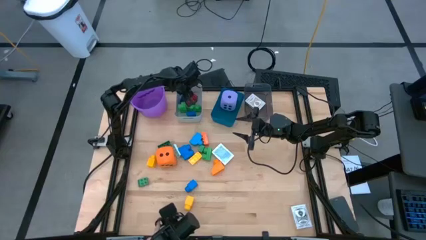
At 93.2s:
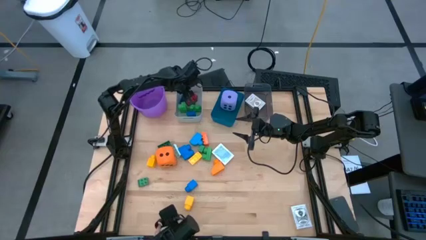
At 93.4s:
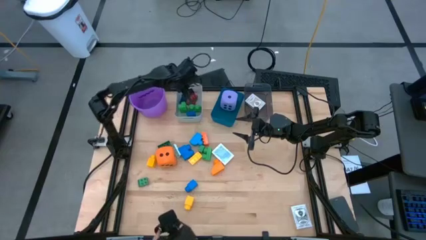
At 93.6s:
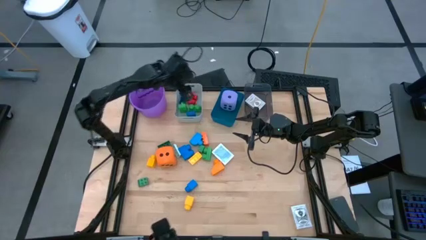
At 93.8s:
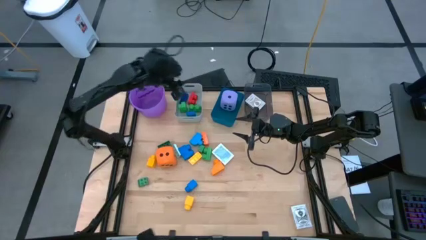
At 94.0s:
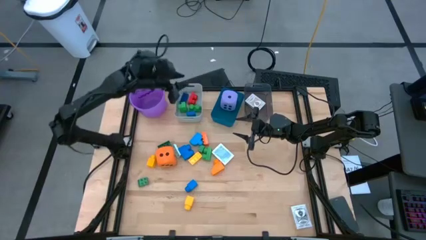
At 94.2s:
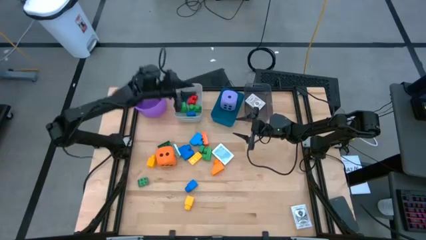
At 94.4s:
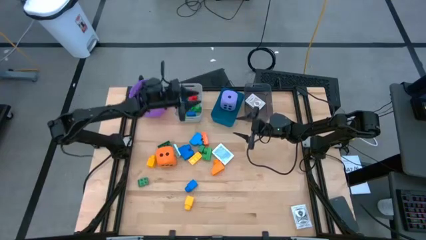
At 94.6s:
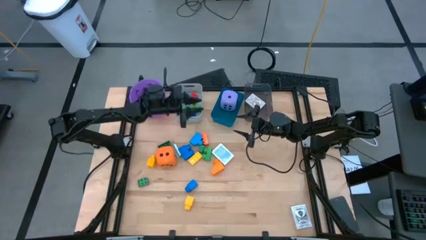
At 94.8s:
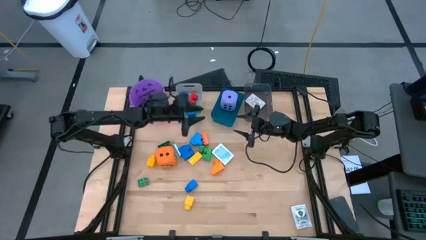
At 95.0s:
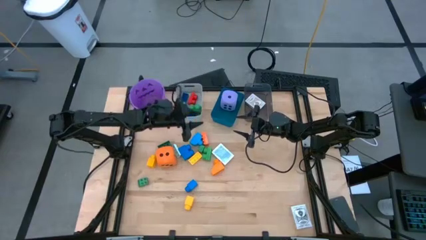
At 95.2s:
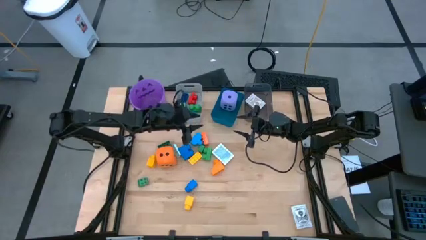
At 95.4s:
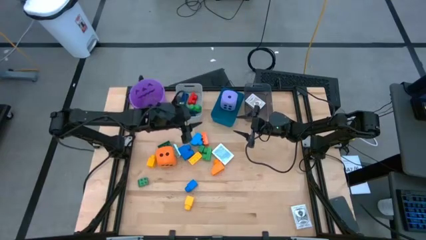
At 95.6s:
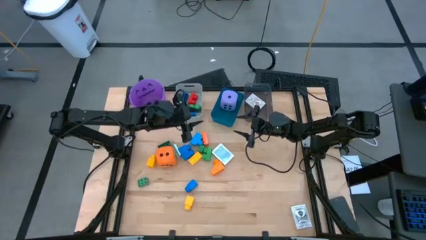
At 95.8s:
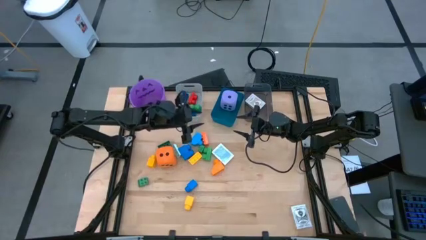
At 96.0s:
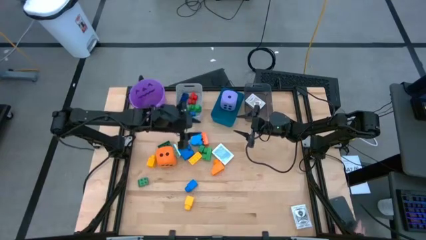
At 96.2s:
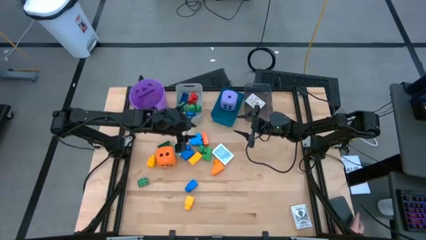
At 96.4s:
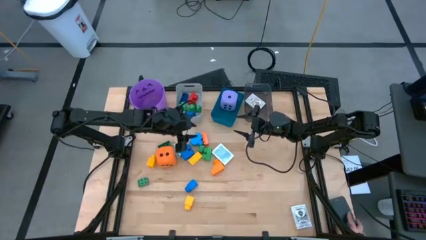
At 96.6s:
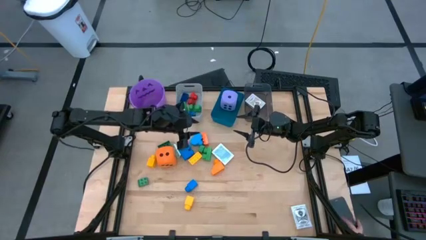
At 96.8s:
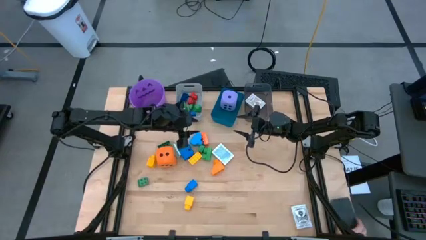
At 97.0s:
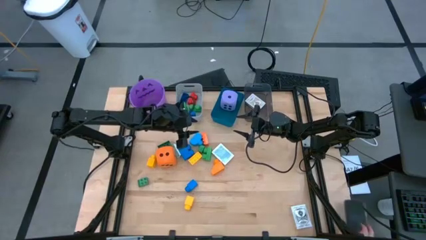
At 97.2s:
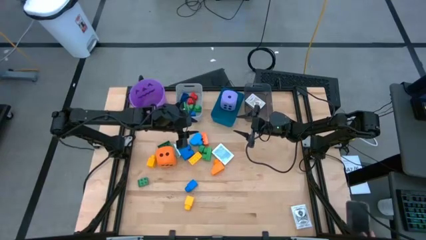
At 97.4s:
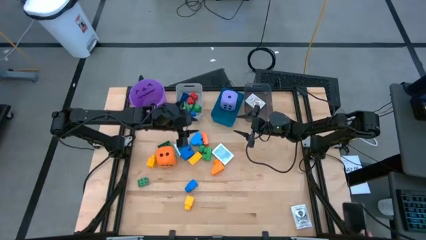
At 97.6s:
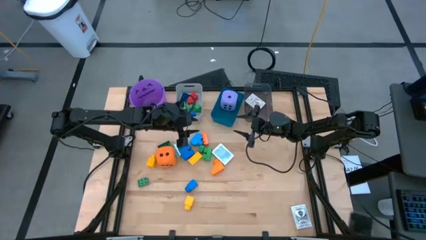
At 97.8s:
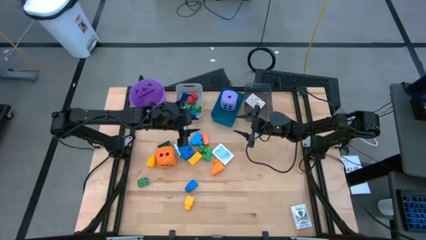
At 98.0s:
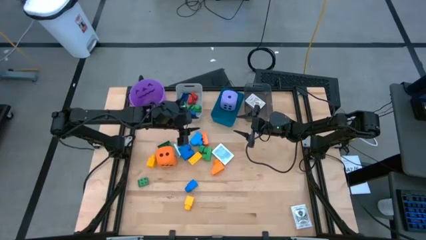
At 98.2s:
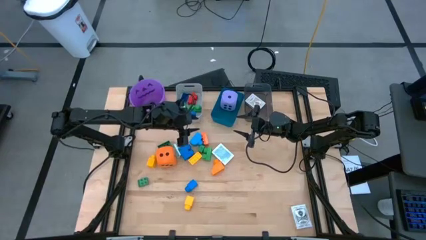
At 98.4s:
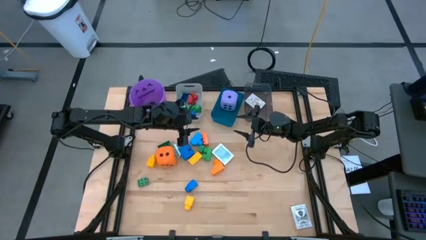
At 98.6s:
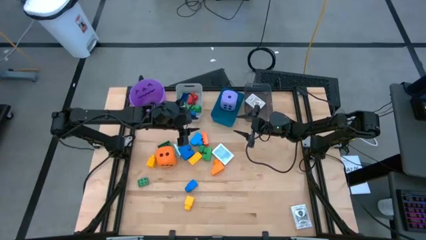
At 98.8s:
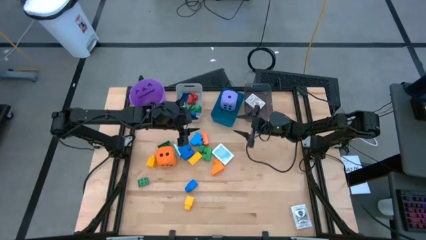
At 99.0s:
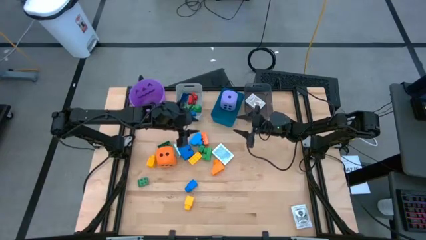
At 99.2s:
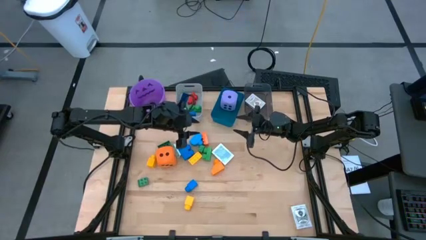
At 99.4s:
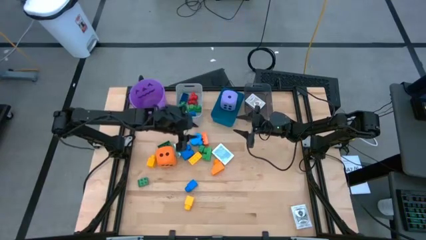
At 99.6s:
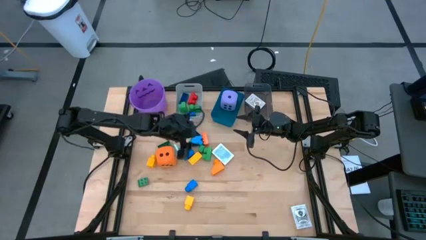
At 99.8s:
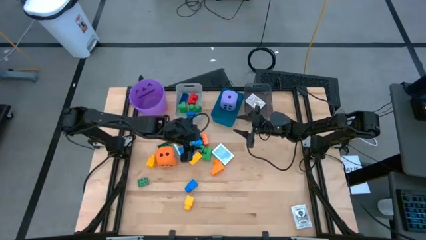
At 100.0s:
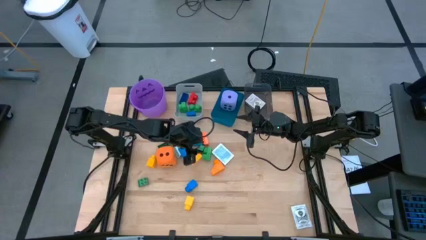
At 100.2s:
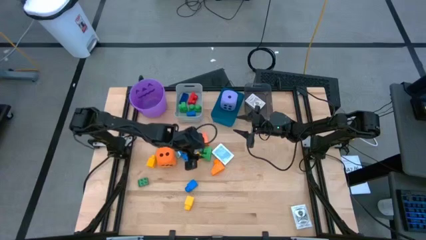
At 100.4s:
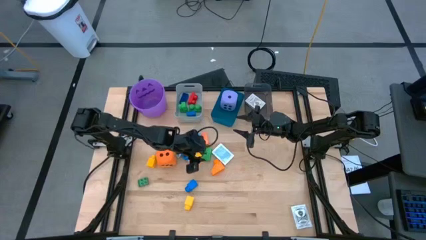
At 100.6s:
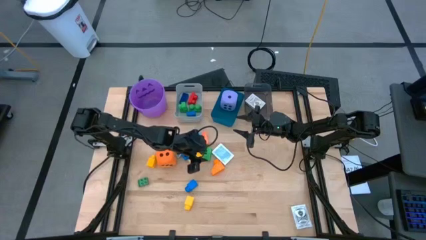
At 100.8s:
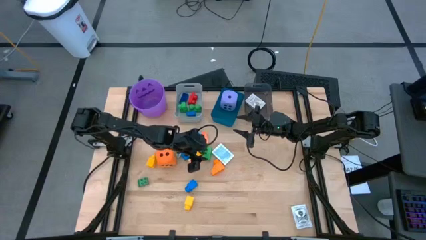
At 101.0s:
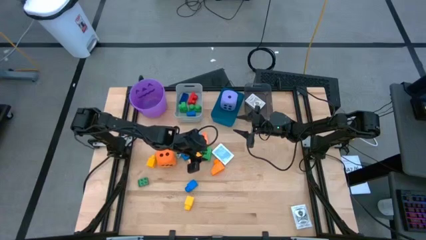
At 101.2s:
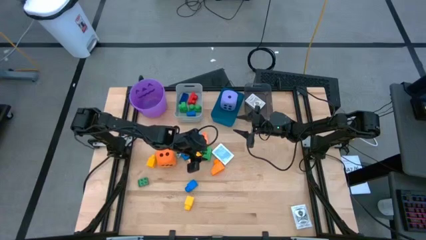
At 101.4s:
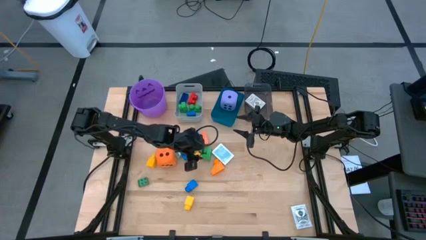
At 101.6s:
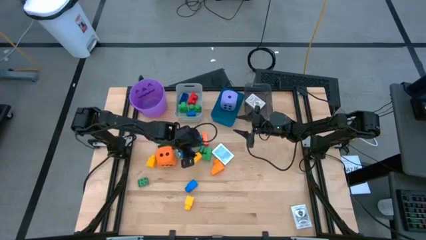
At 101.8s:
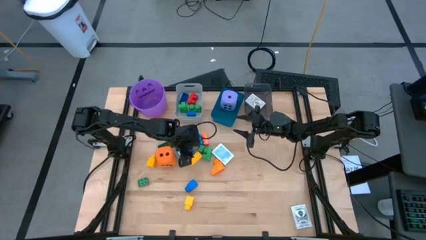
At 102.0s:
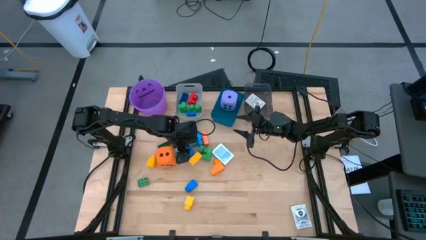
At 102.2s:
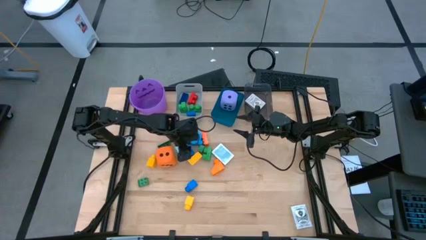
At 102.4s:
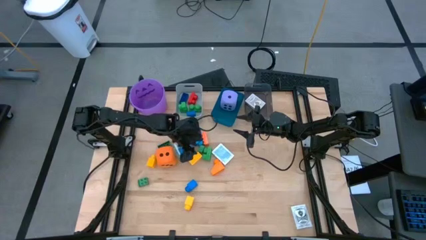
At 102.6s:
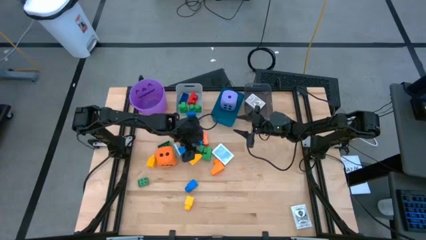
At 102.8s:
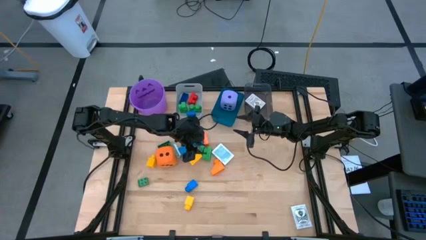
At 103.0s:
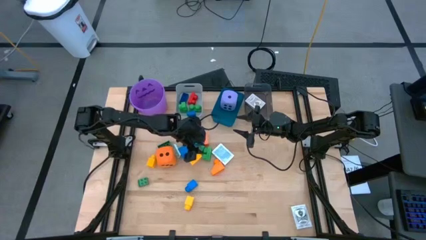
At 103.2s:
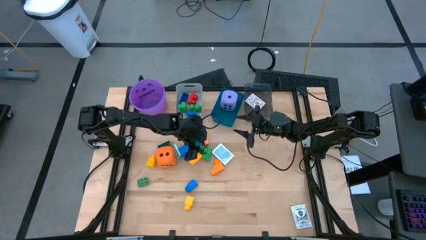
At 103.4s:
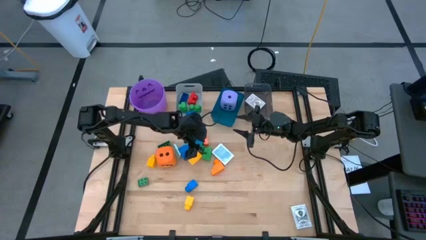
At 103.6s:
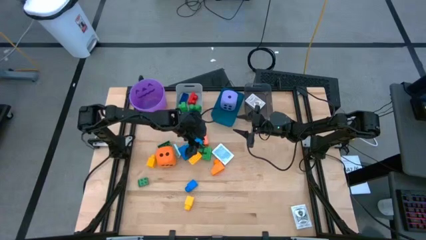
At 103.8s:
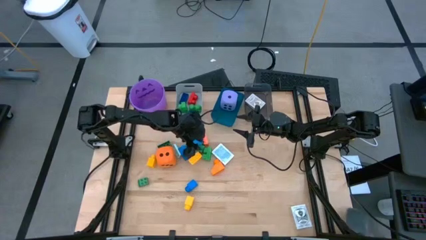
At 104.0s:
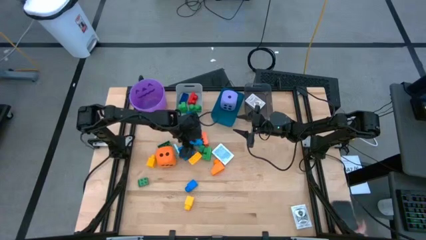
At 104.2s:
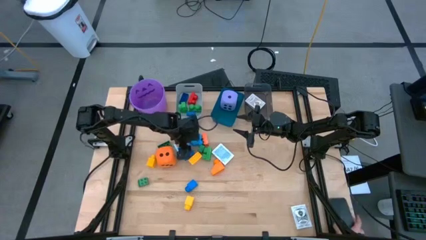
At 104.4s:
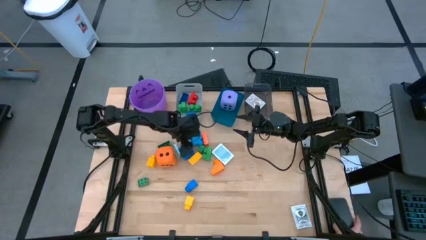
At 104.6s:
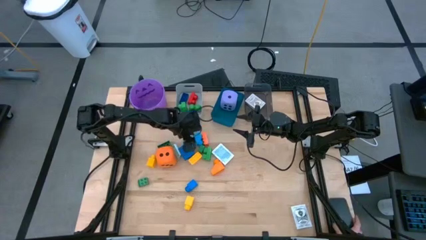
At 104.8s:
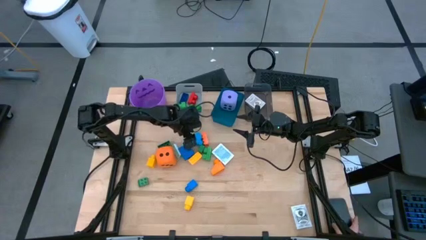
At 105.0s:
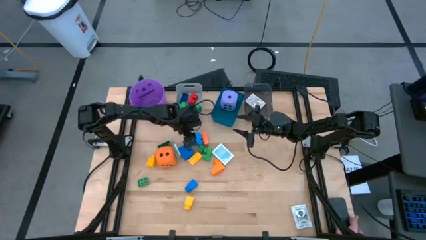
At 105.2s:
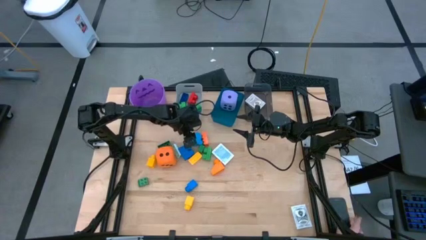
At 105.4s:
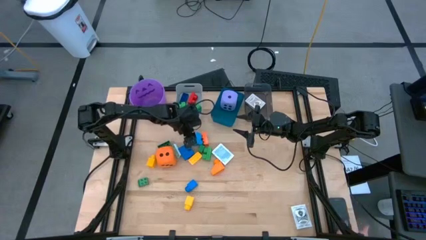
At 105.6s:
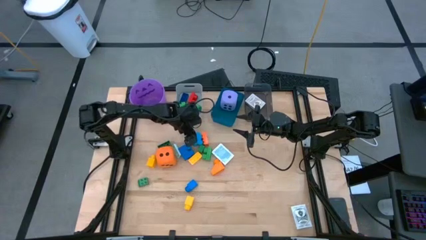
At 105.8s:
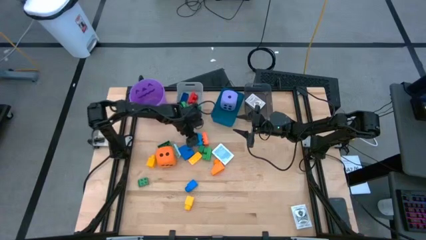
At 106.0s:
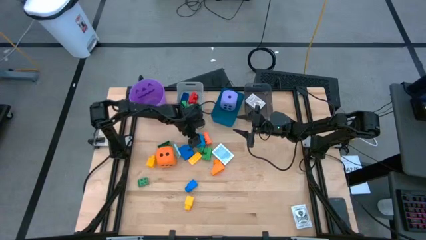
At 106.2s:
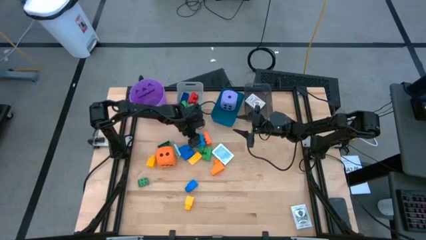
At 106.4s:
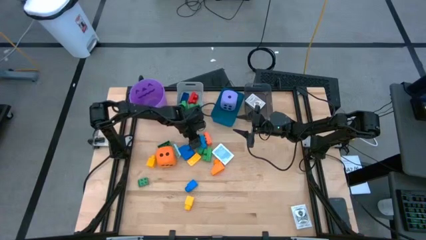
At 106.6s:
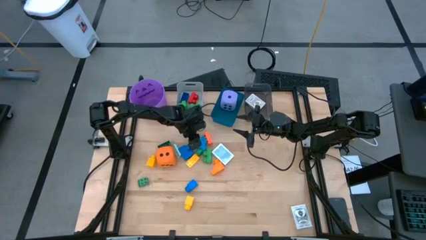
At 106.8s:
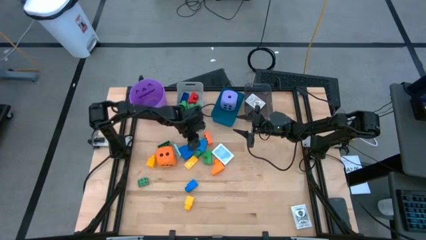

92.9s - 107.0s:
Task: Pick & Place Toys
Put the blue game piece into the gray bin

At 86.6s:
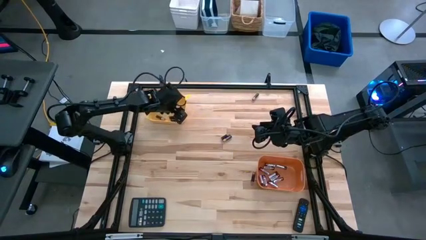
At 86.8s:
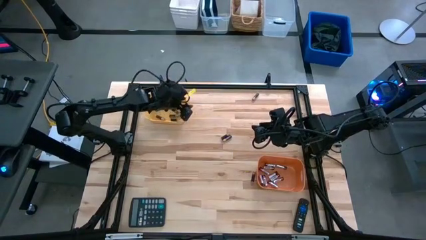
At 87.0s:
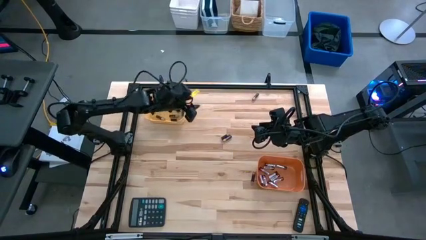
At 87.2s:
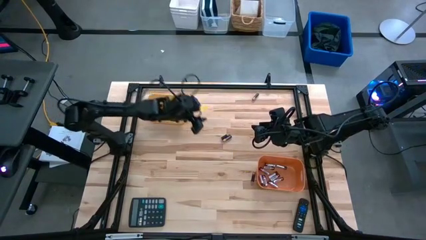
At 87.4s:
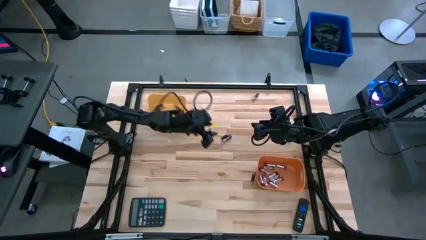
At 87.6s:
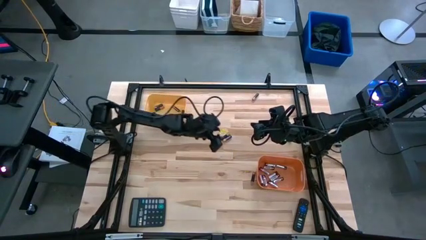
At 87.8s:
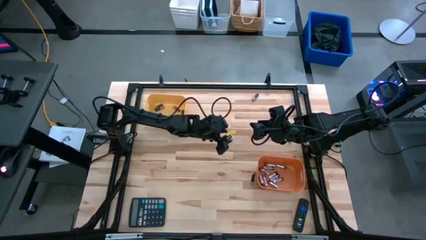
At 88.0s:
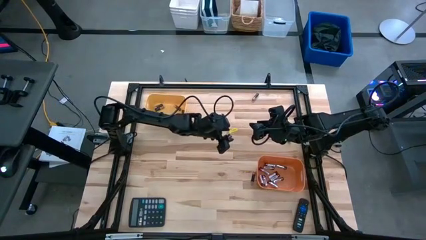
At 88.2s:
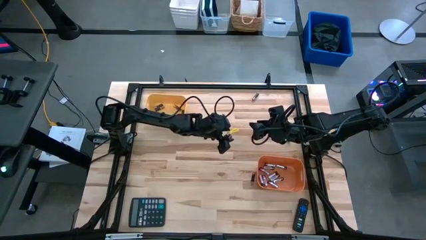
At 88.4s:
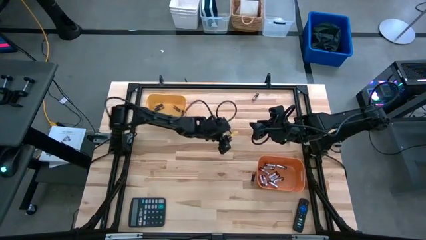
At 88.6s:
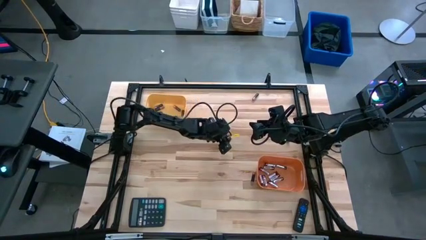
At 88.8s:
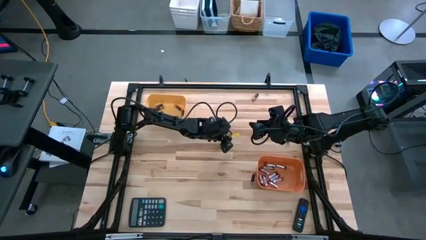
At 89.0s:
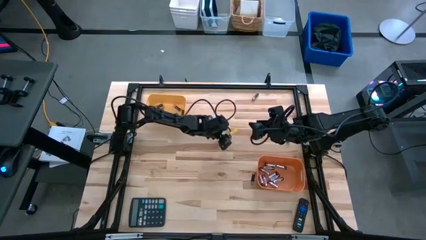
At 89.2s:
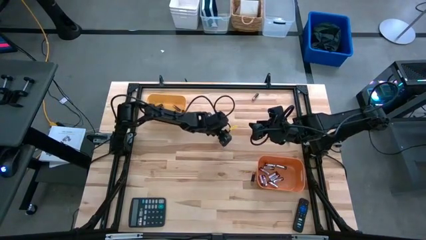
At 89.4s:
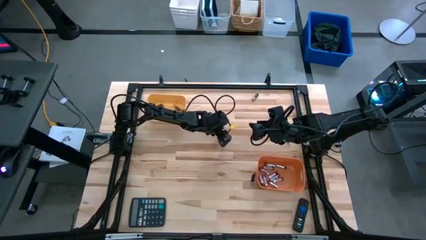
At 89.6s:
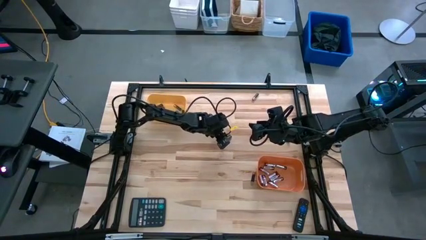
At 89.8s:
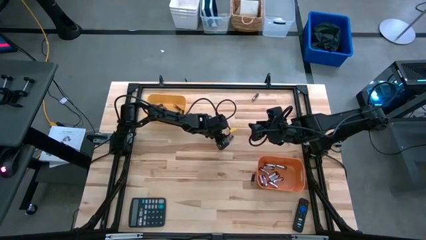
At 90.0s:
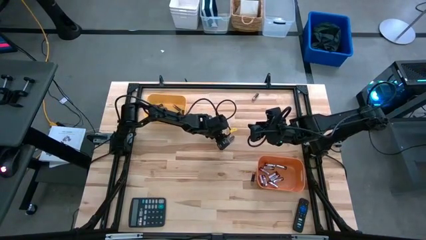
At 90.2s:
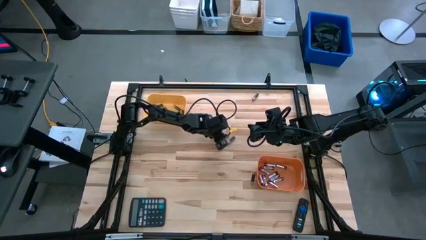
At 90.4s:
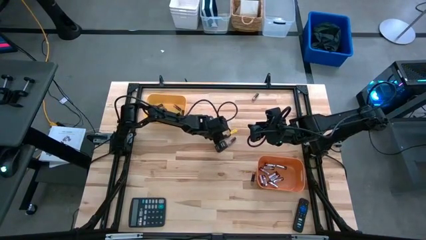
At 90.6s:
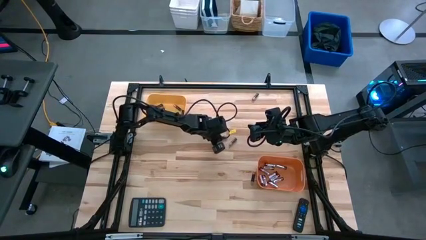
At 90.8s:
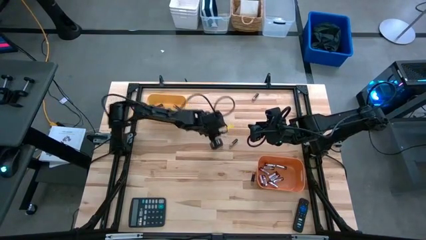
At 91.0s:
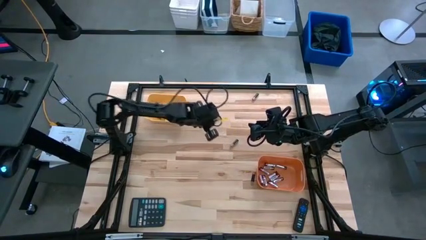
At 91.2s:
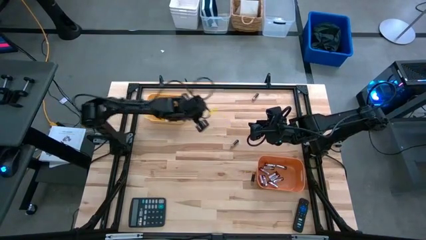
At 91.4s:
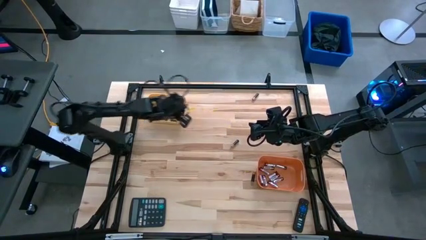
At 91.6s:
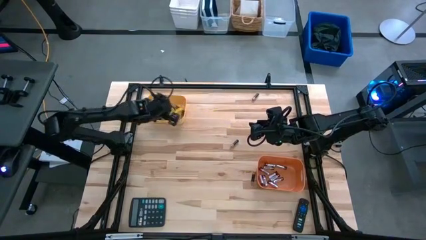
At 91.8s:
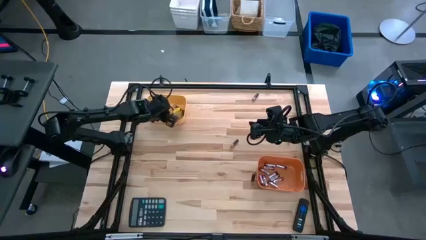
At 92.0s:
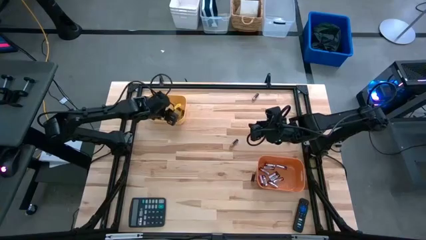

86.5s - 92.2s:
Task: Sort batteries
Put the black battery into the yellow bin
